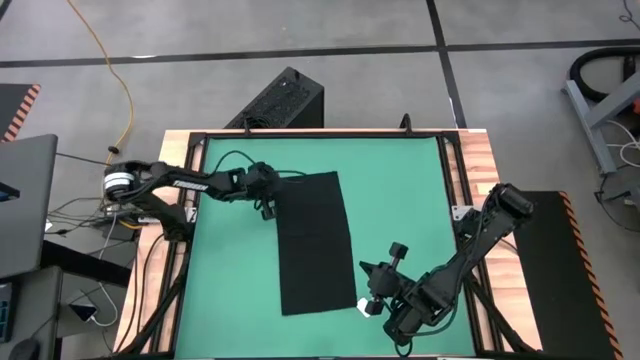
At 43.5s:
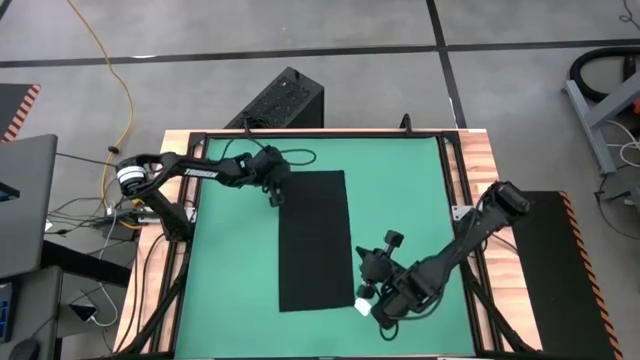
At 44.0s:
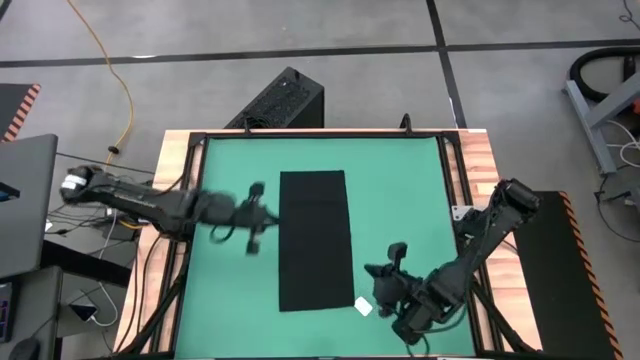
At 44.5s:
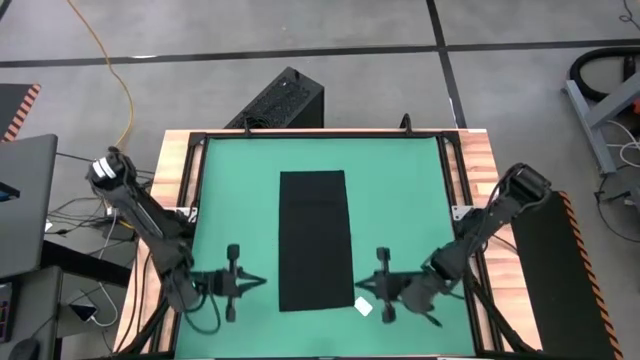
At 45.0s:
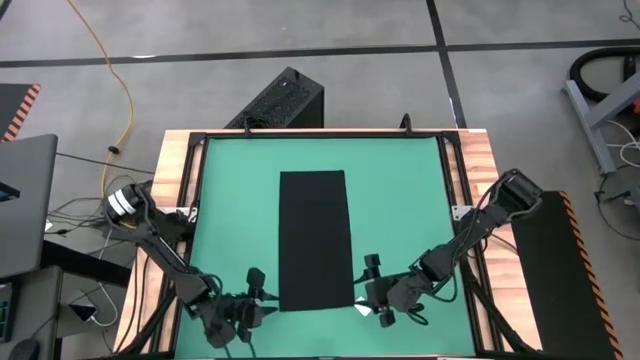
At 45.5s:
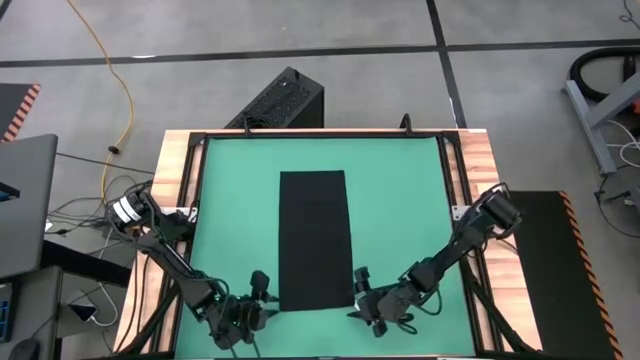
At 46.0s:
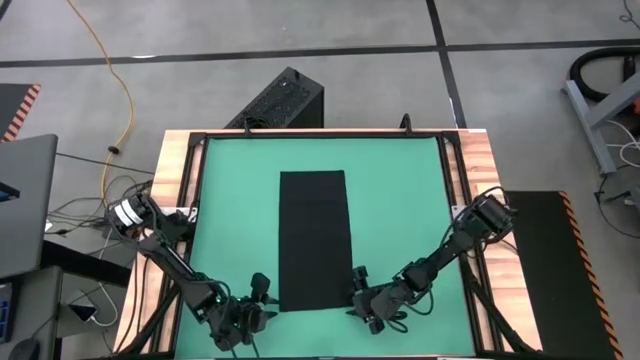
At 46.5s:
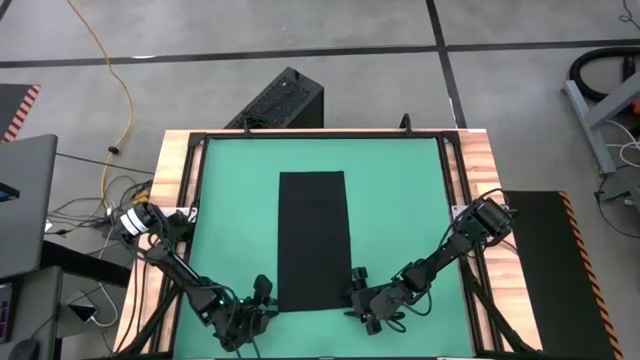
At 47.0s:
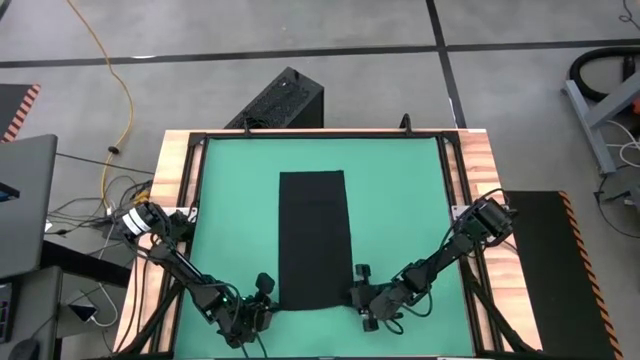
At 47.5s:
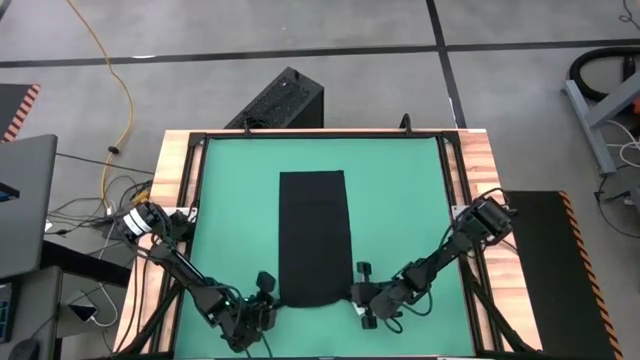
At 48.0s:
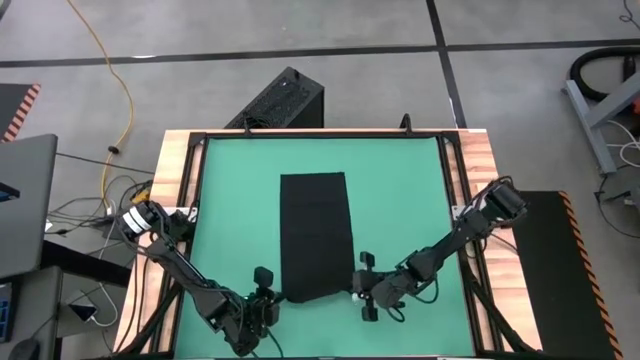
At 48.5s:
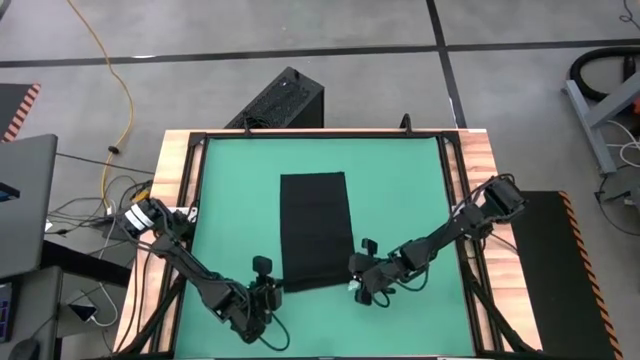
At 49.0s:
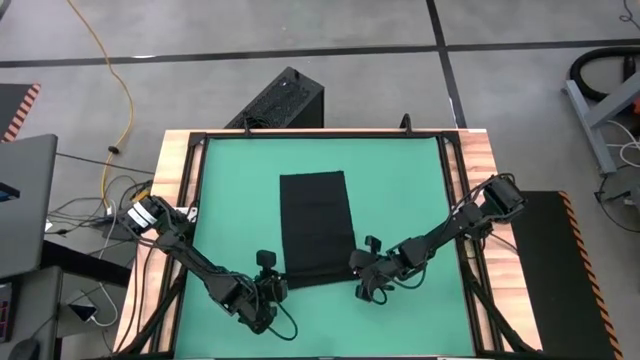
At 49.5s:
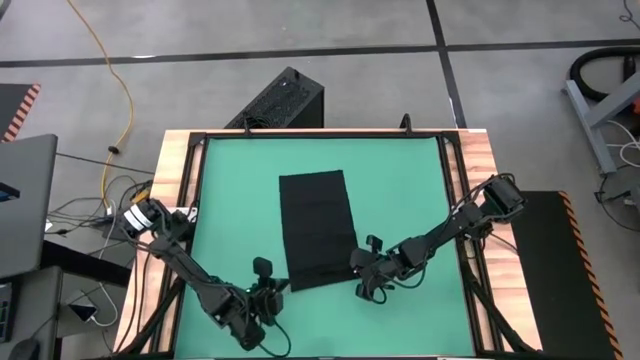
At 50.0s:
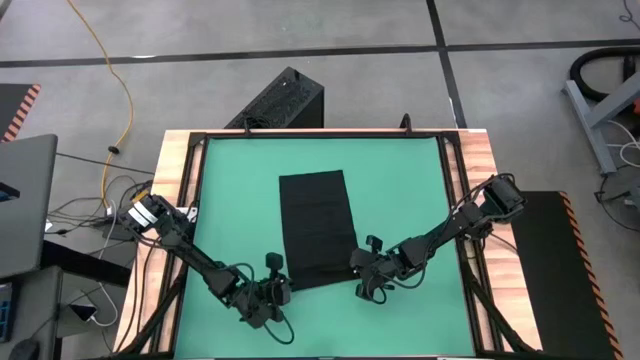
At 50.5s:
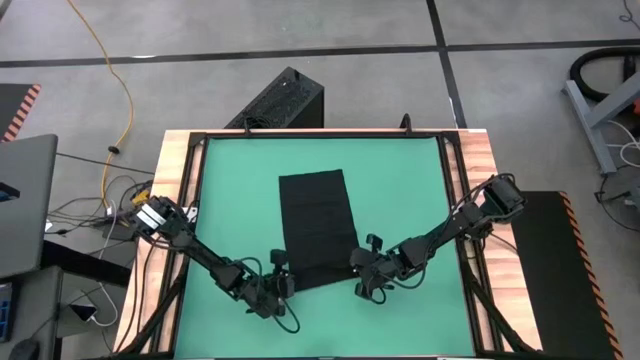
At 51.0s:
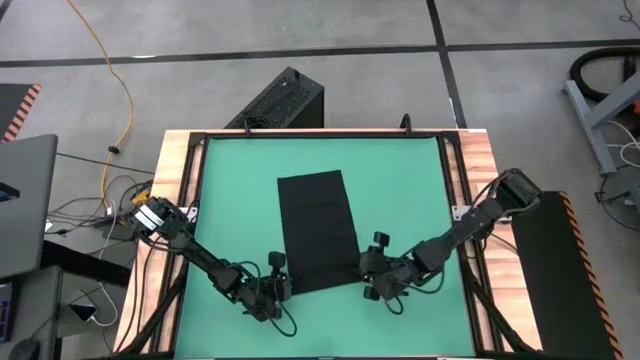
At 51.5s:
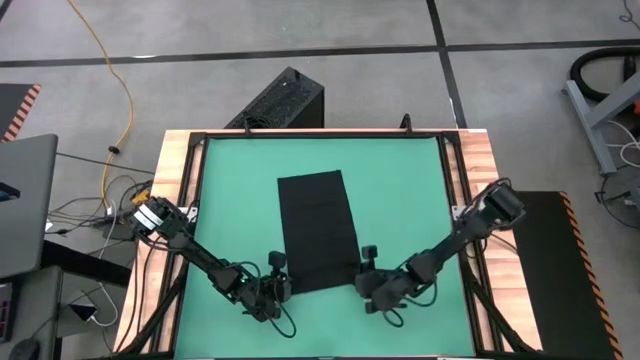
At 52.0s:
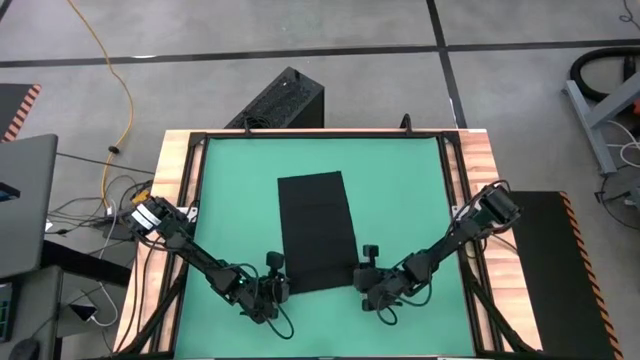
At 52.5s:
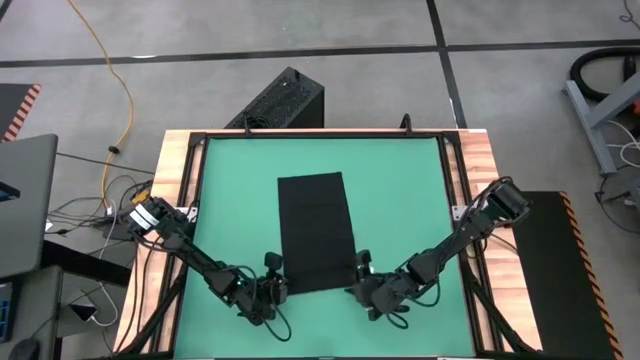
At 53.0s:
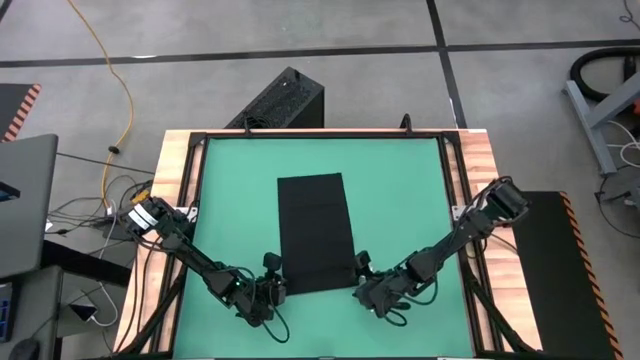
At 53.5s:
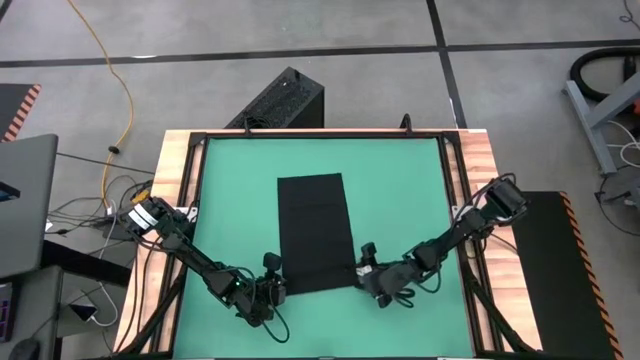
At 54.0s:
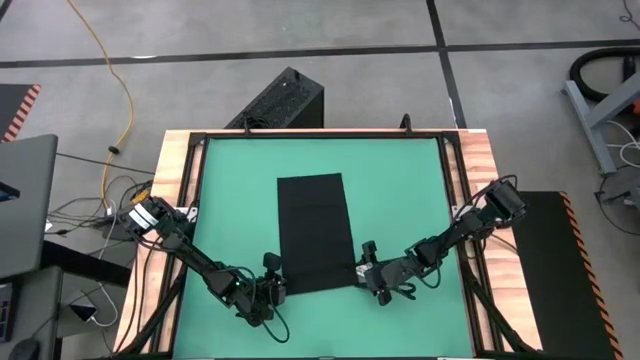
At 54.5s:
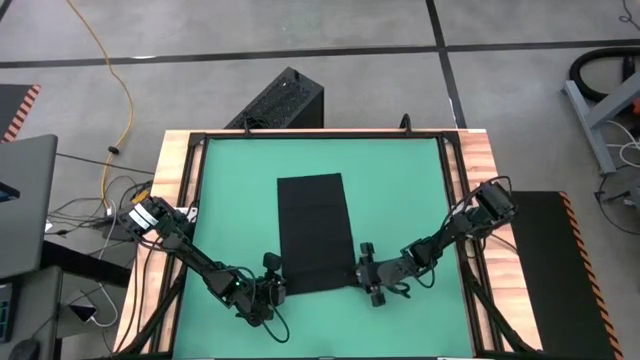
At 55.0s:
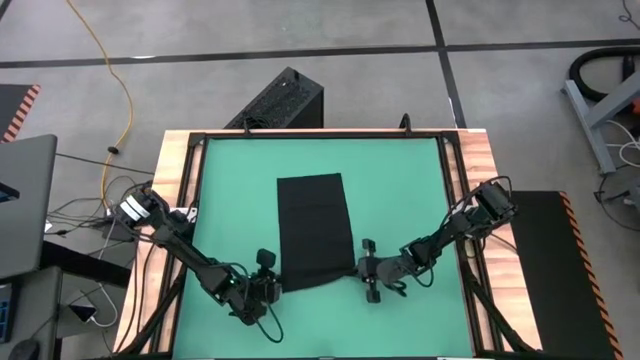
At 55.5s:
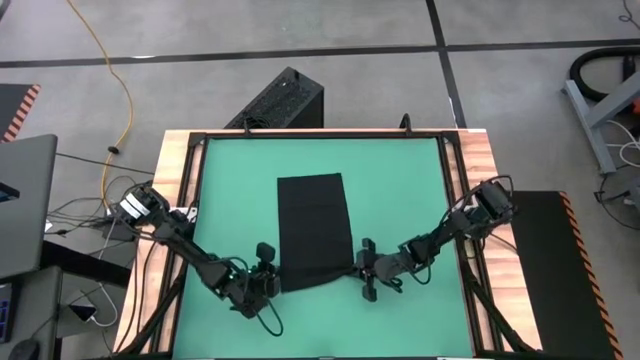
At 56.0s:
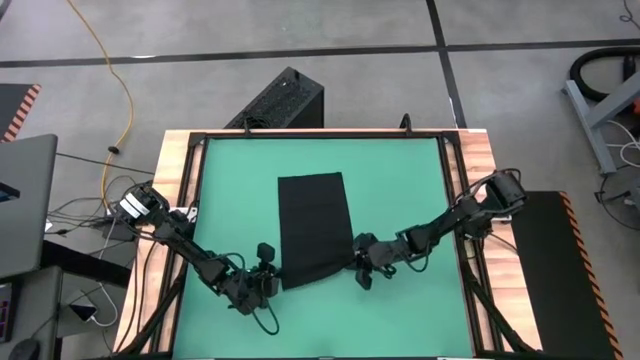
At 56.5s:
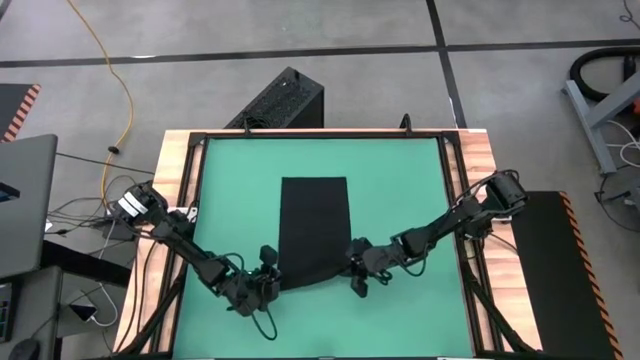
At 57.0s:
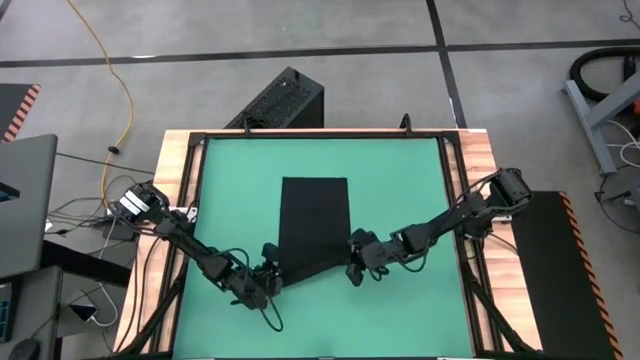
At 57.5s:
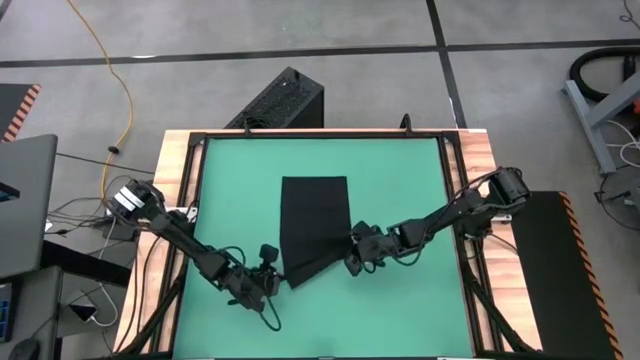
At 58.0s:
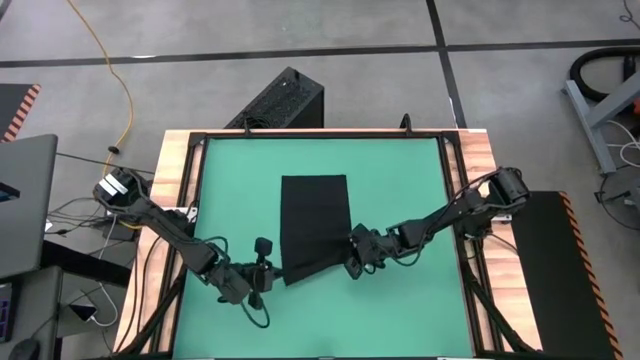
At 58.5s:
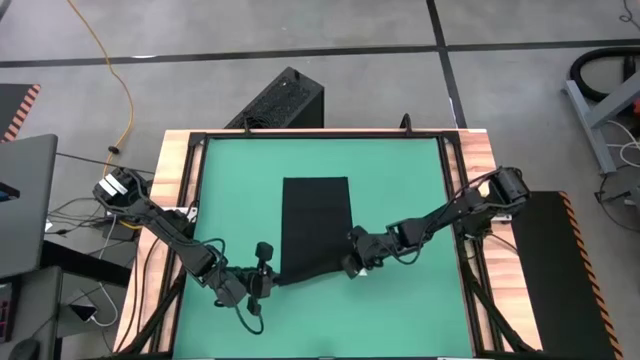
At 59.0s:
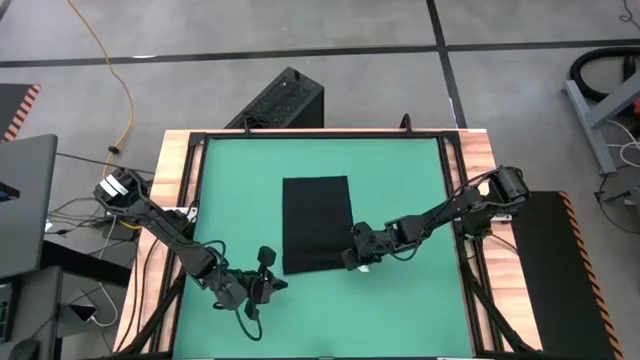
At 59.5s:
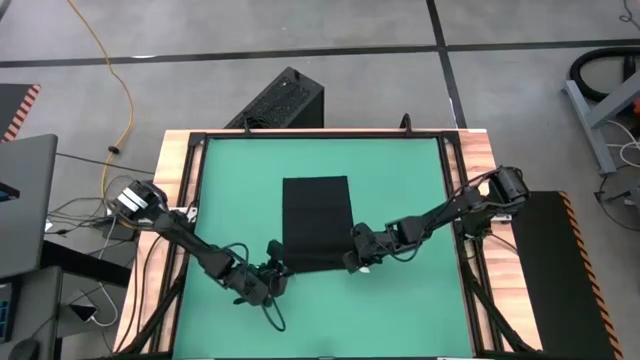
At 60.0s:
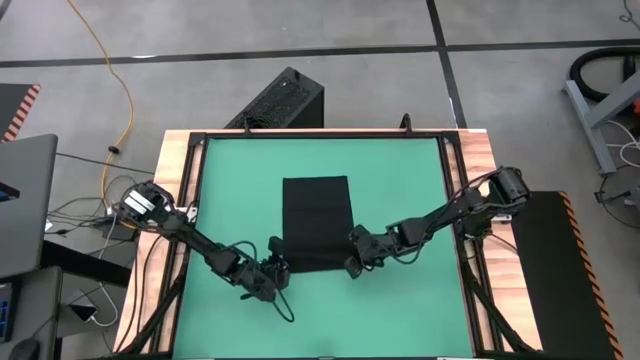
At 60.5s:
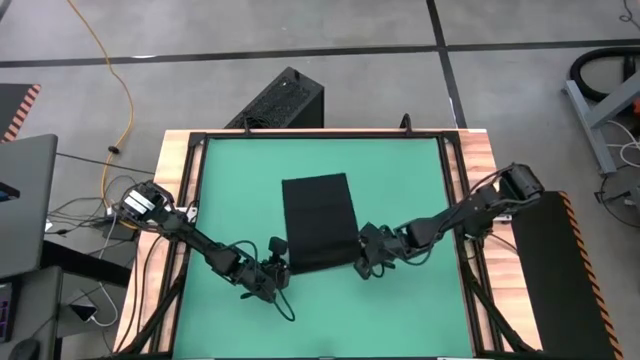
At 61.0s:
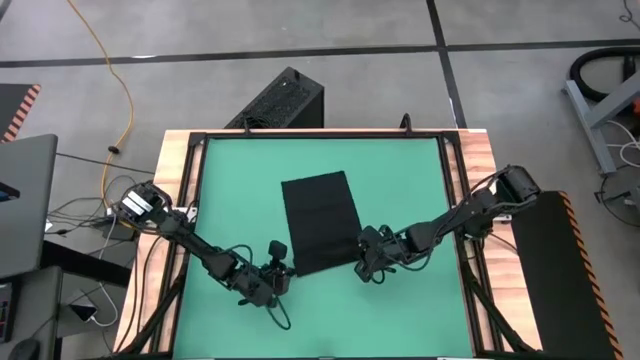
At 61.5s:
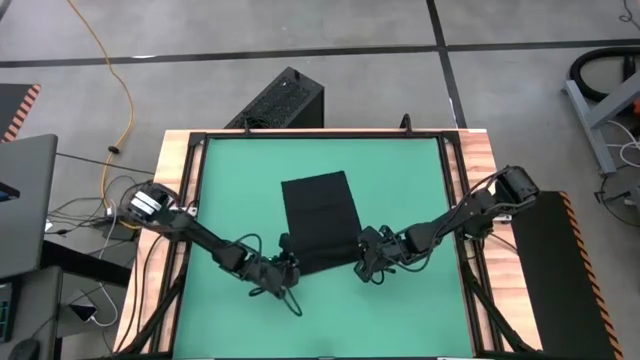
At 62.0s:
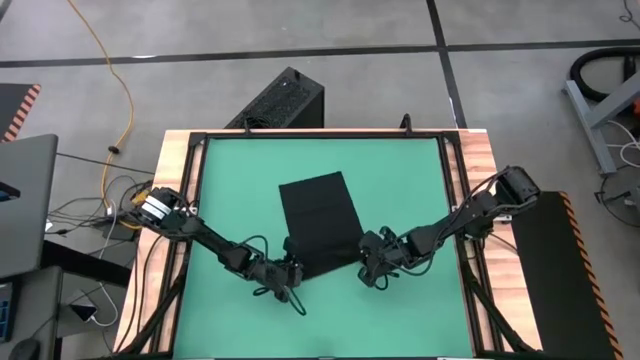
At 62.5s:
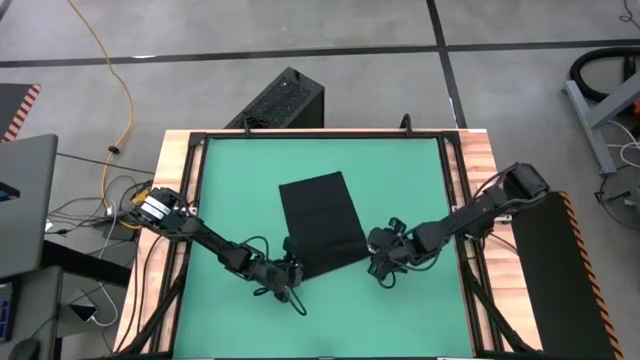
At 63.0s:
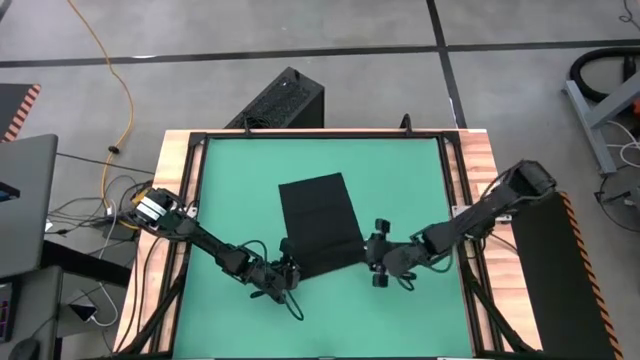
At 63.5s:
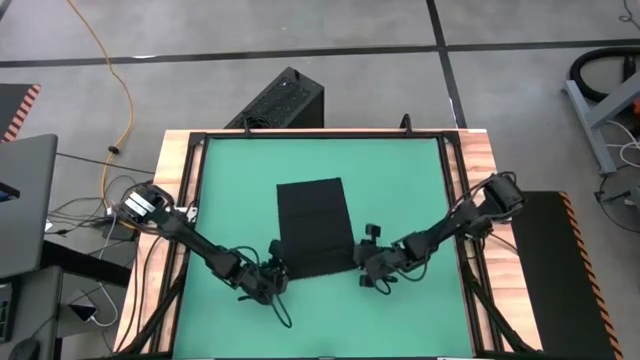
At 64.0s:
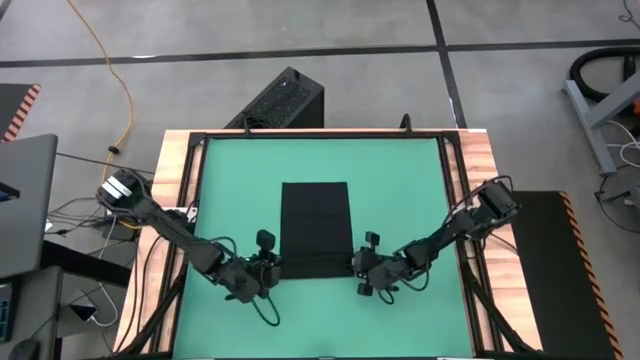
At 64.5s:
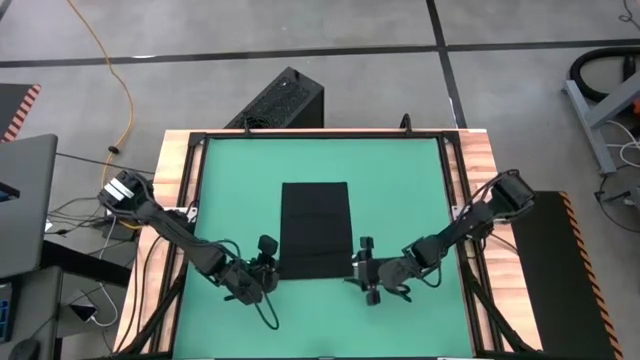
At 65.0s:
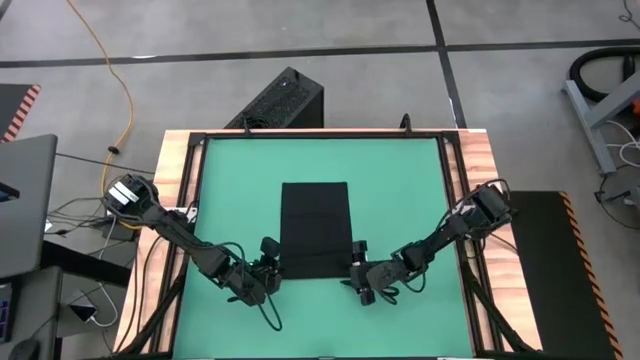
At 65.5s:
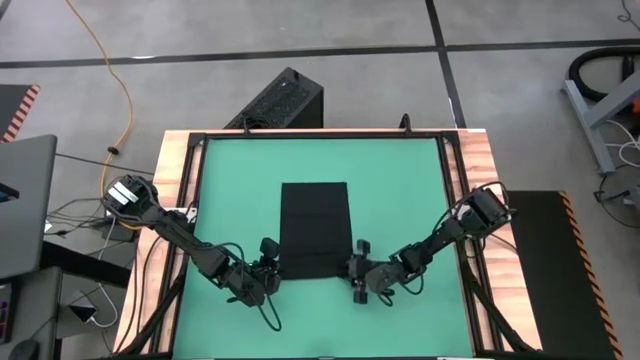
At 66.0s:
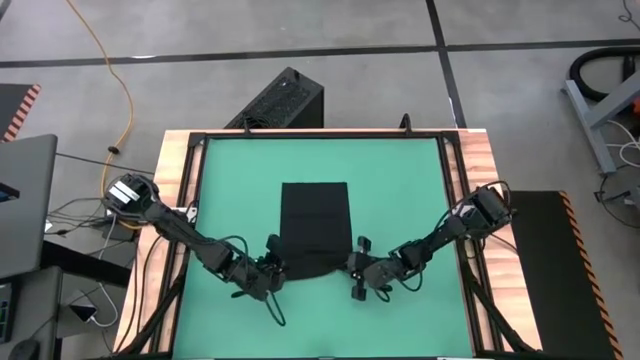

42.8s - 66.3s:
Task: Roll towel
Roll the black towel
